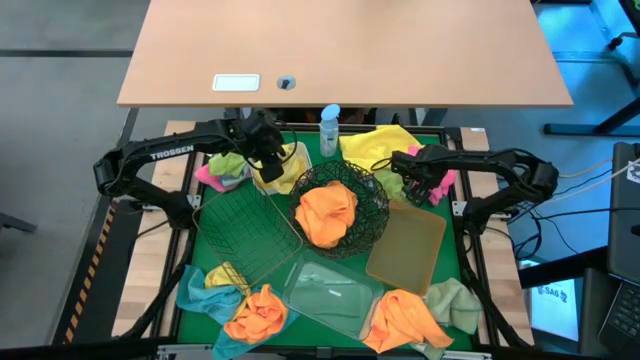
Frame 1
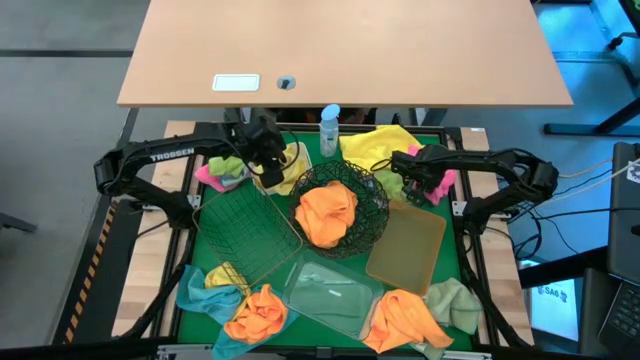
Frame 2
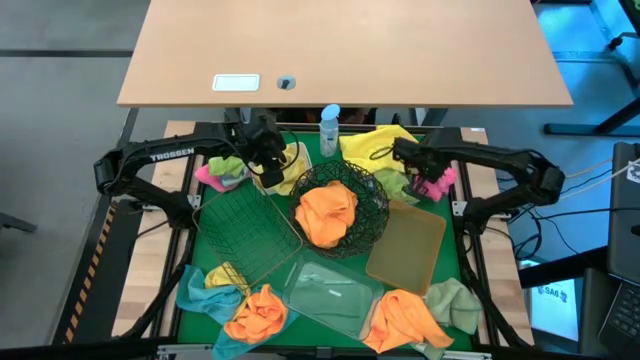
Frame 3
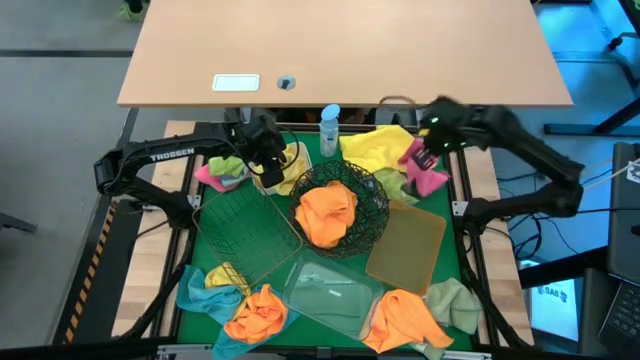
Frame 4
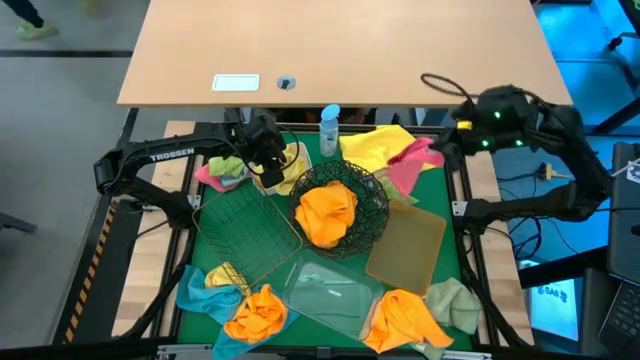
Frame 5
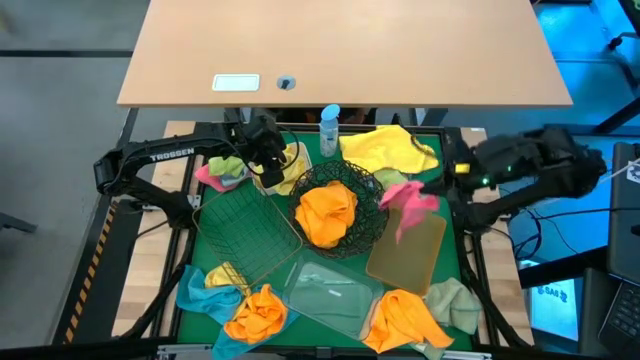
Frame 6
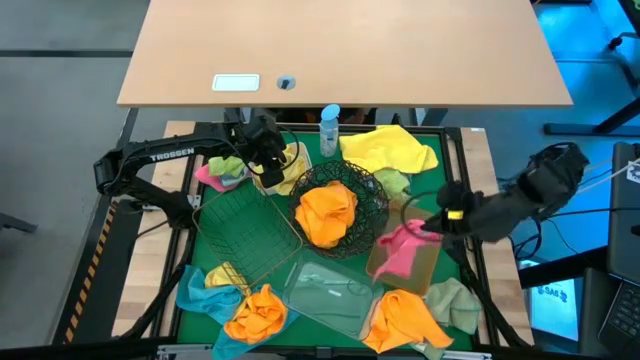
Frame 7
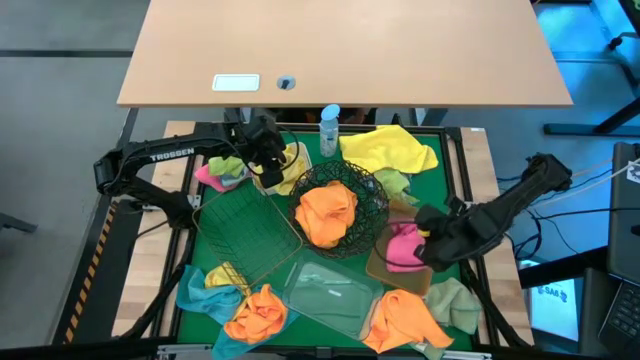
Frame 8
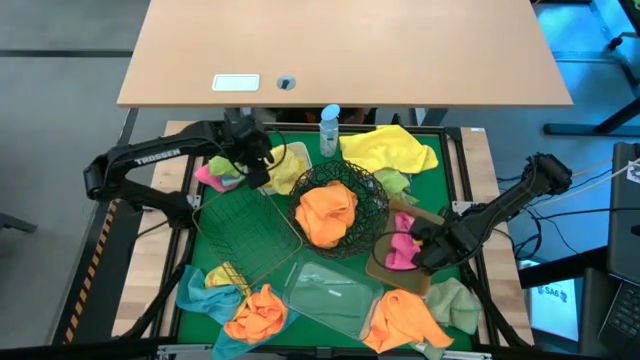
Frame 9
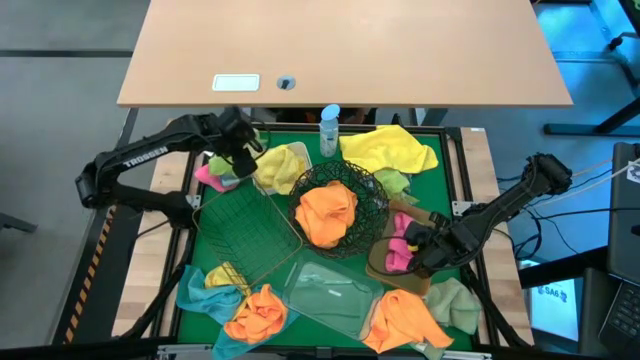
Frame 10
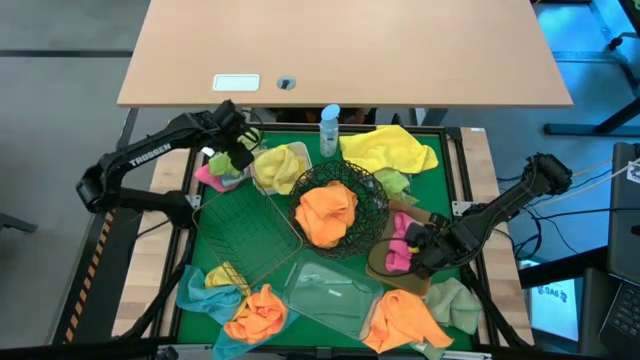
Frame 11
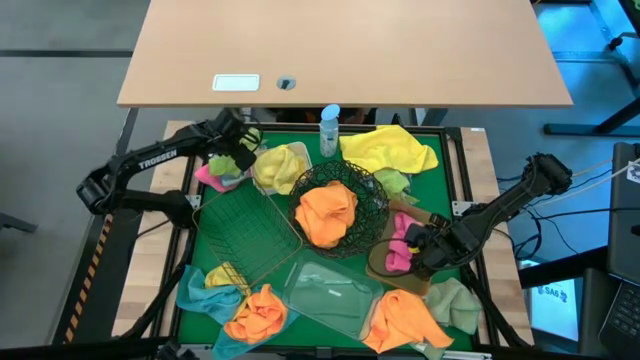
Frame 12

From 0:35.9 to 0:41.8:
Task: Sort microfiber towel by color & place in baskets
Put the right pink towel into the orange bin

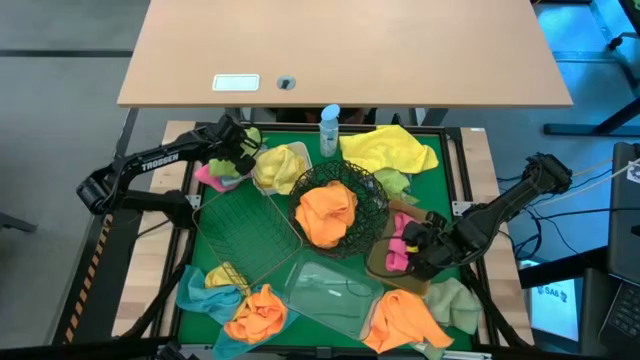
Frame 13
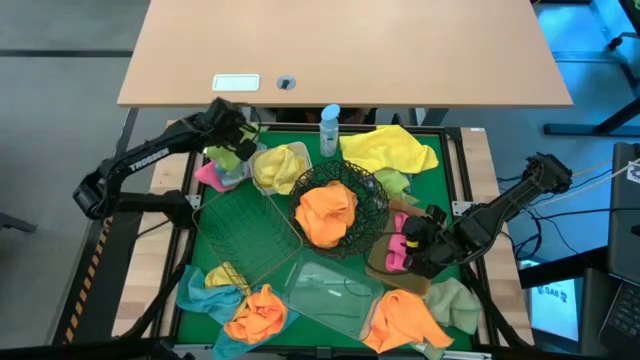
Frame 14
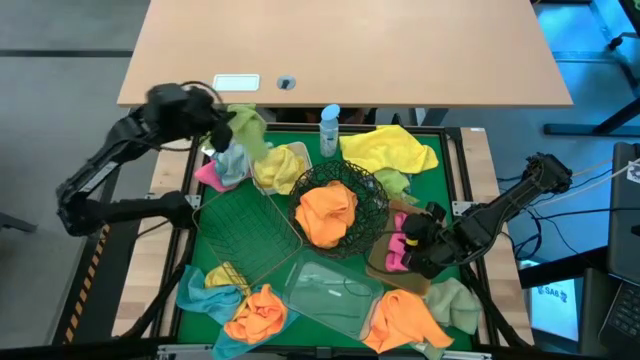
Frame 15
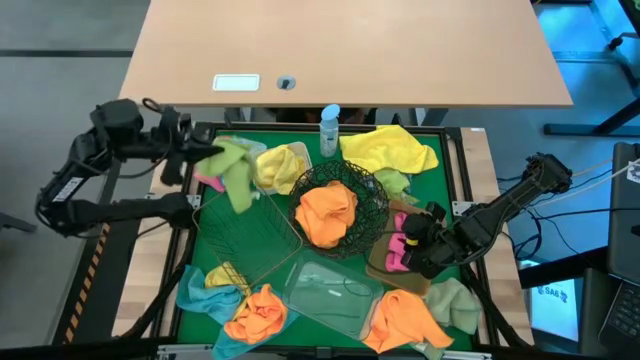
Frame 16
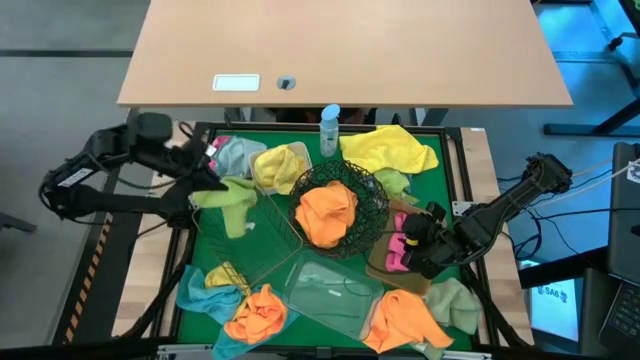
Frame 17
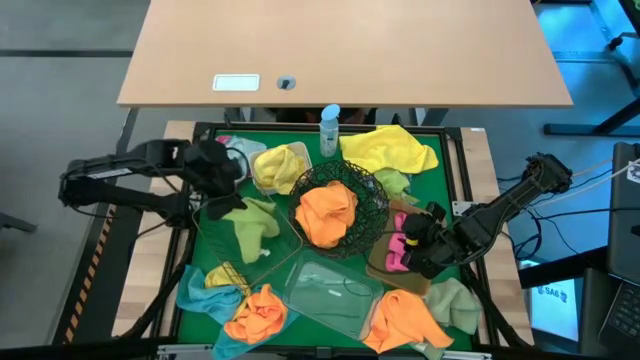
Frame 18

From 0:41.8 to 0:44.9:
Put the green towel into the rectangular wire basket

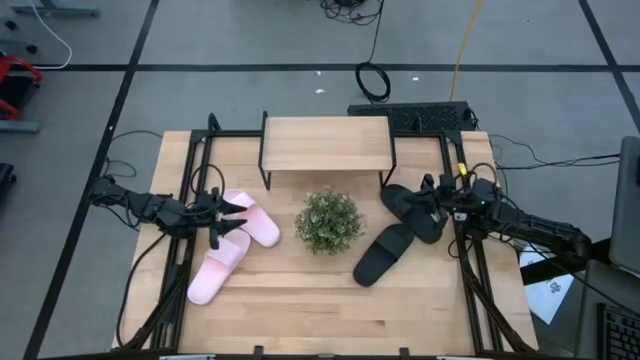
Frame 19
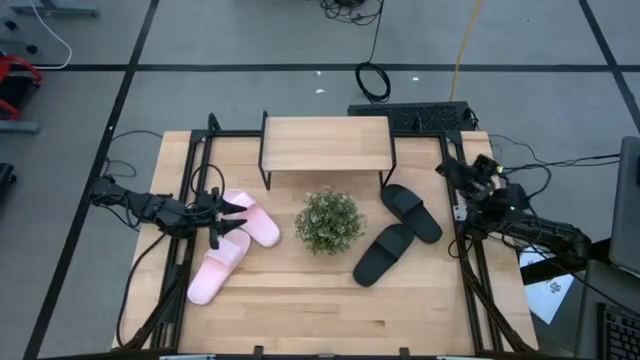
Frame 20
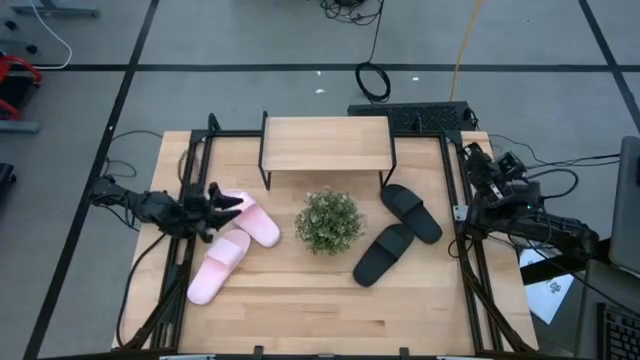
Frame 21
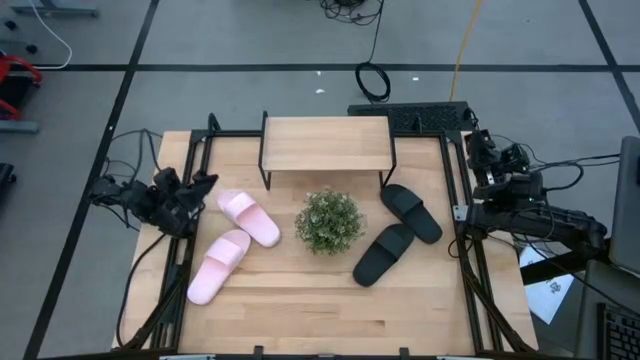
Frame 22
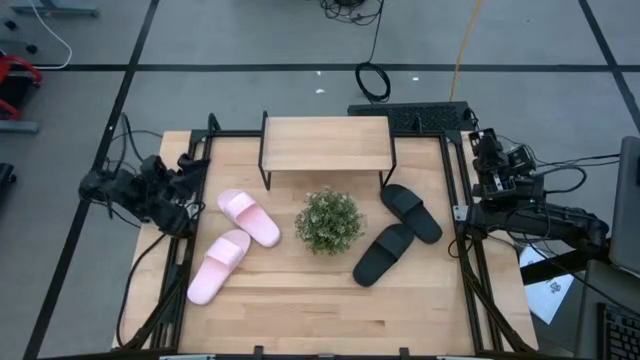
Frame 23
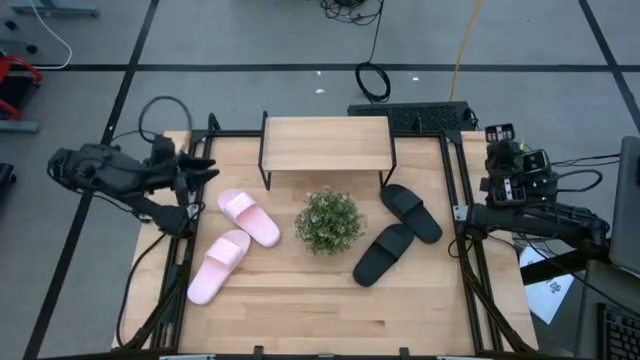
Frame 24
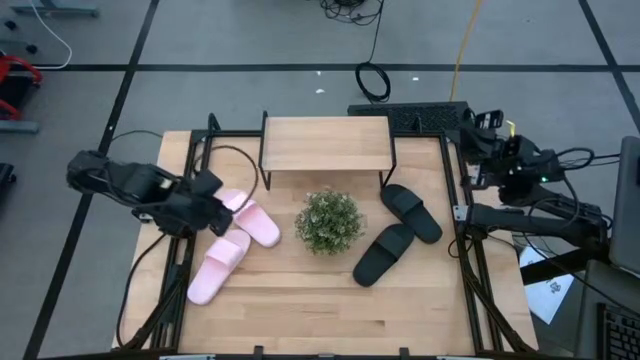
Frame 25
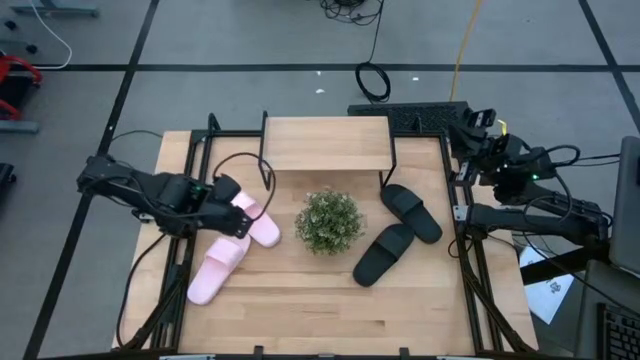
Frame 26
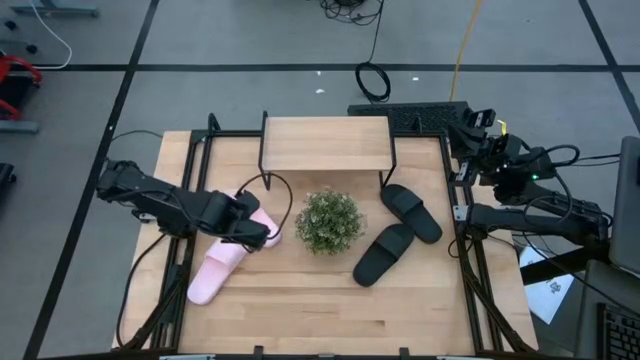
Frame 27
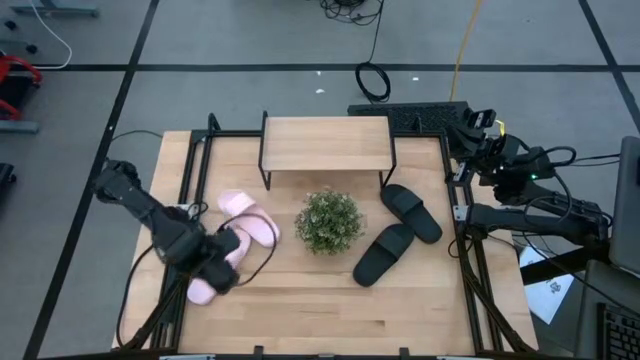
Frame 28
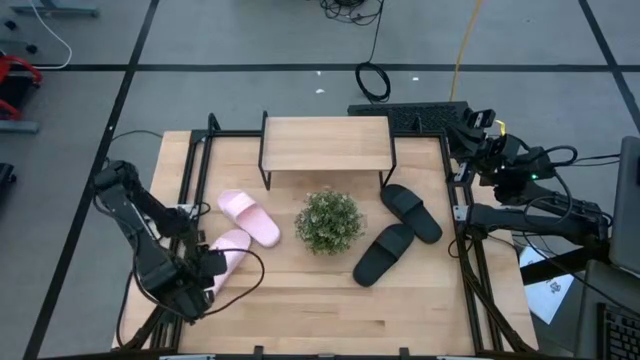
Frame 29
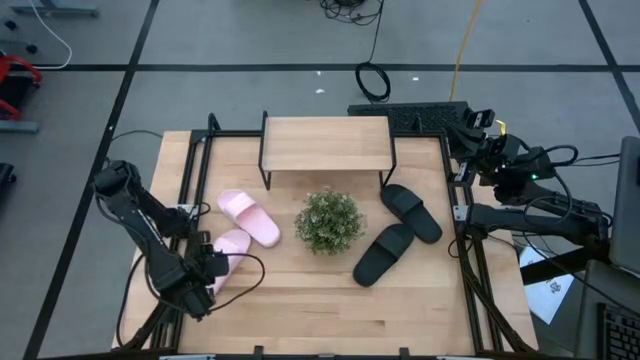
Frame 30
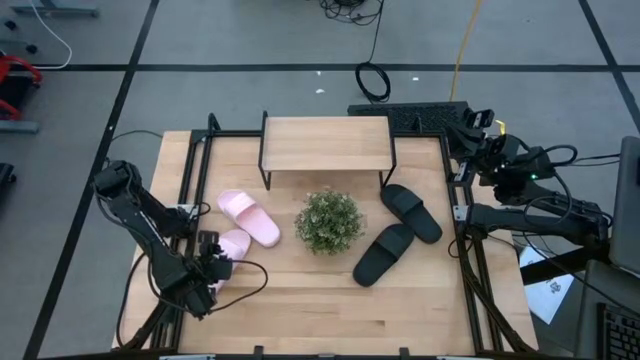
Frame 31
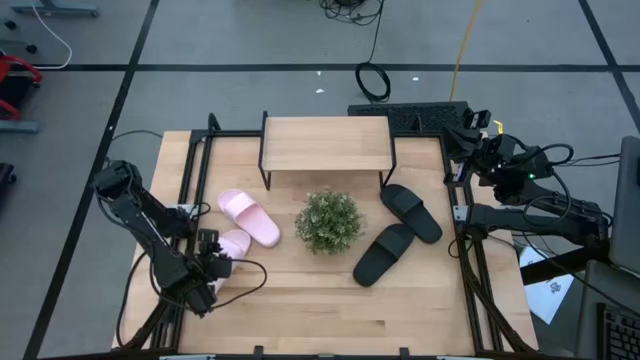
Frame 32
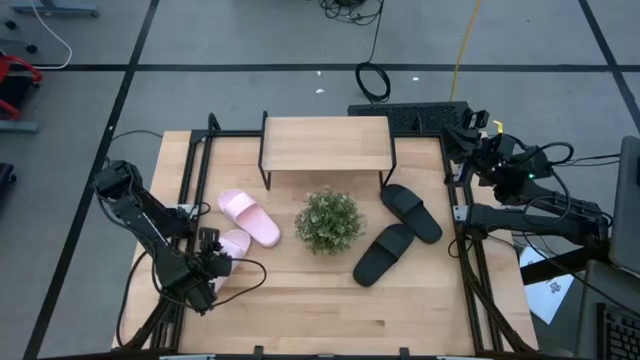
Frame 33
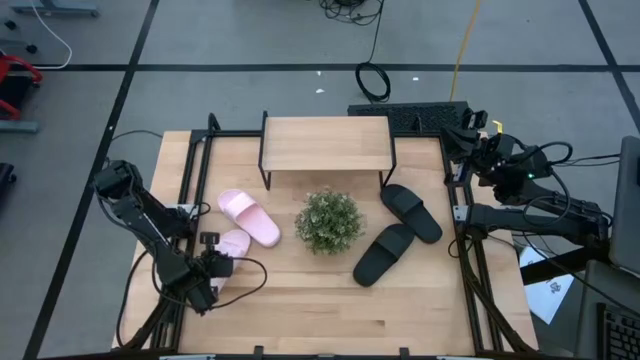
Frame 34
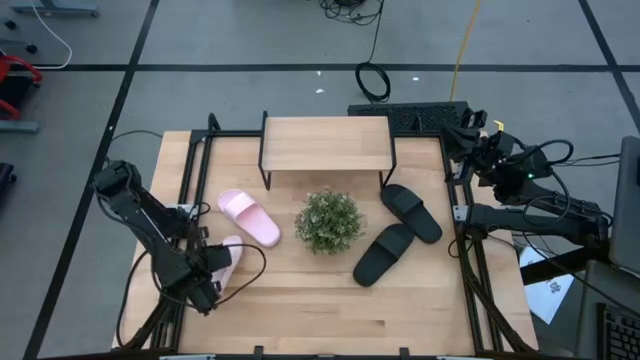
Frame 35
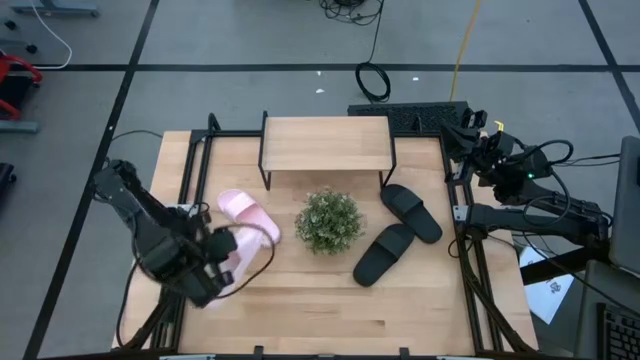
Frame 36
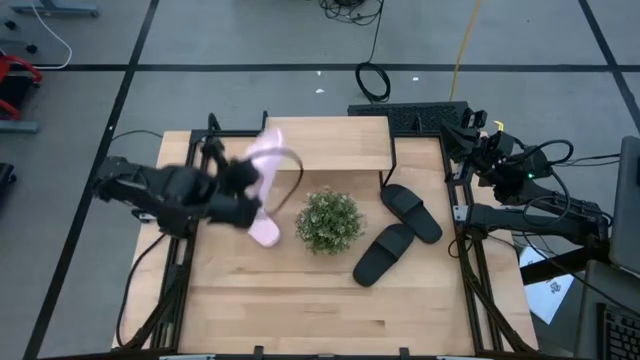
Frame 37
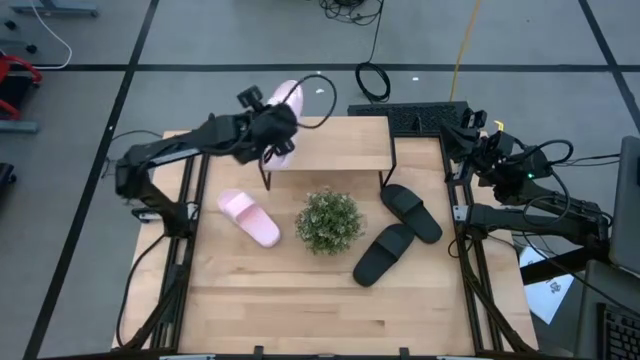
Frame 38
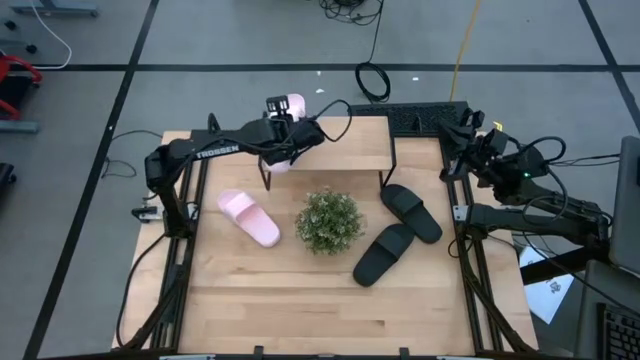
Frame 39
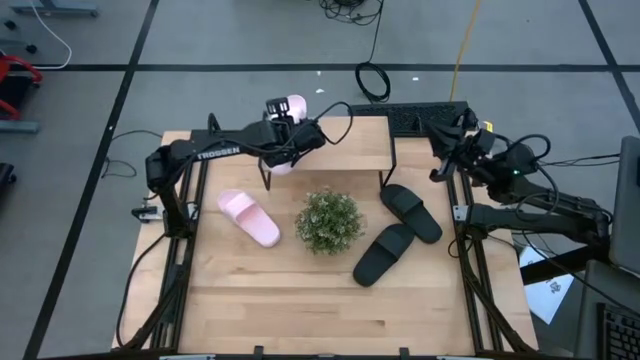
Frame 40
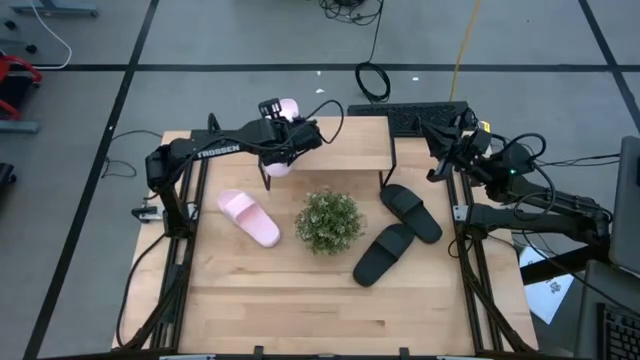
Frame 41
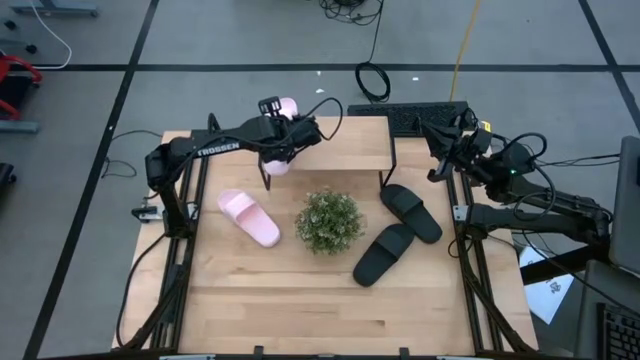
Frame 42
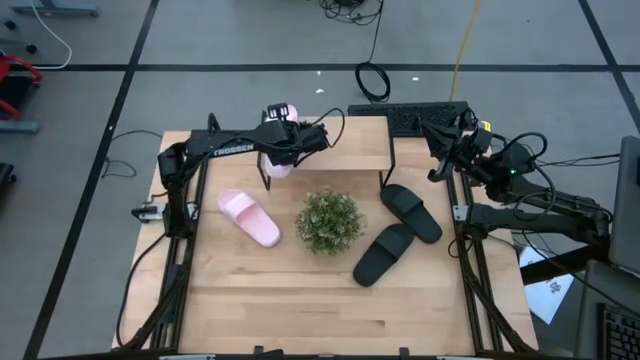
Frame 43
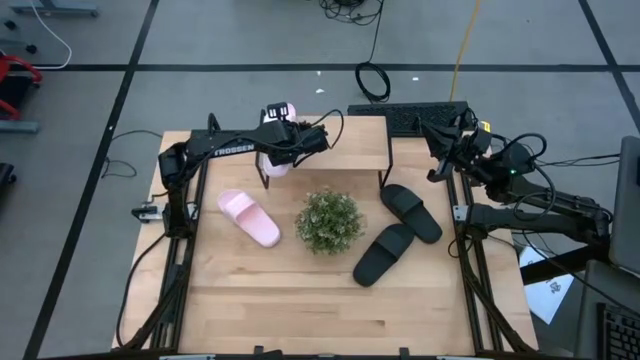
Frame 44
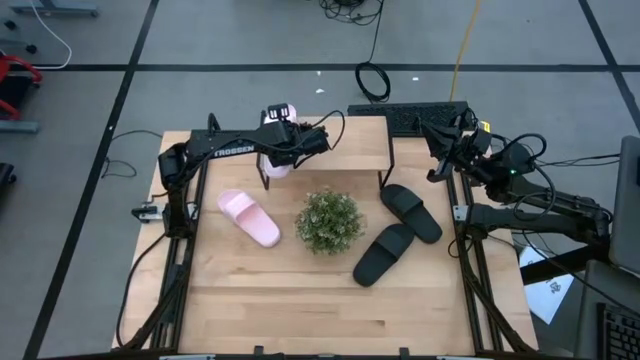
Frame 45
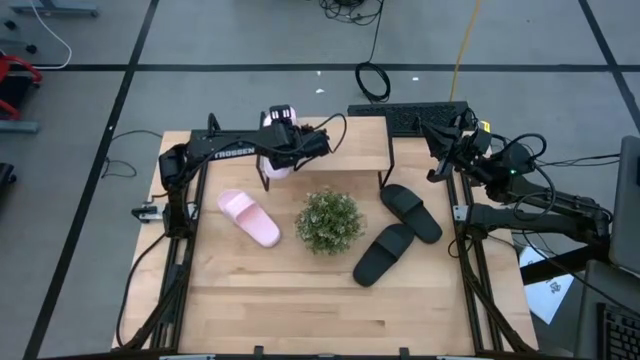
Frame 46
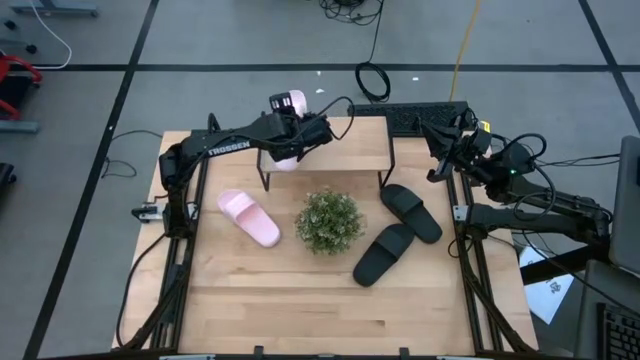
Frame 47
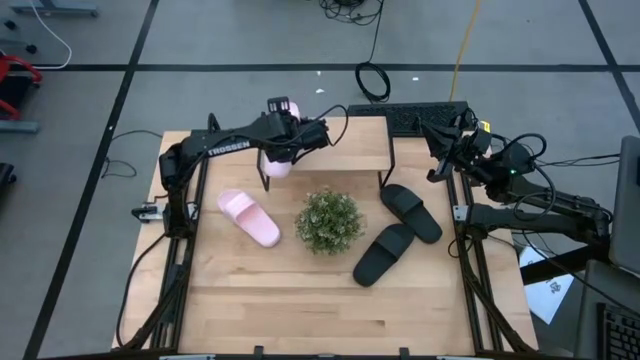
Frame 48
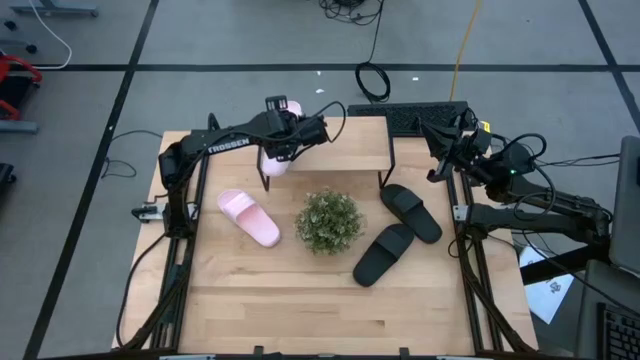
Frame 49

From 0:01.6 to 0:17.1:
Task: Pick and place slides into the shelf
Put the bottom pink slipper on the shelf
